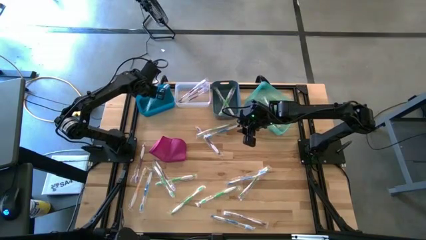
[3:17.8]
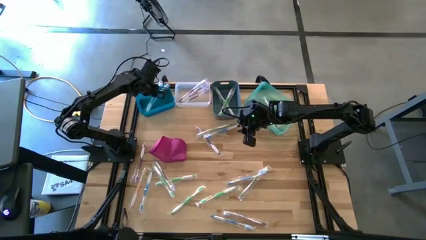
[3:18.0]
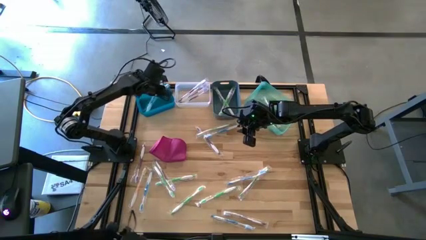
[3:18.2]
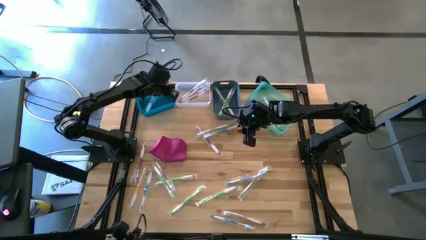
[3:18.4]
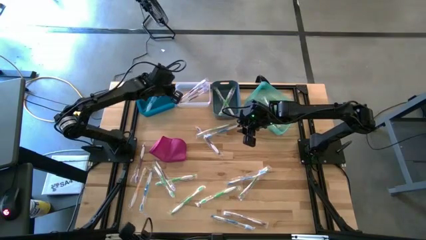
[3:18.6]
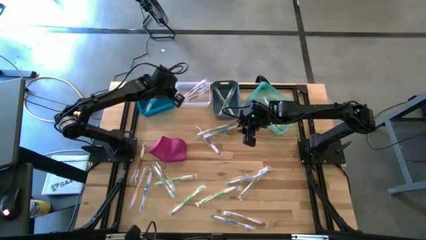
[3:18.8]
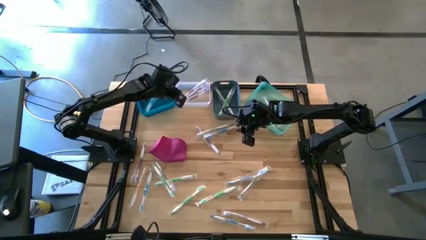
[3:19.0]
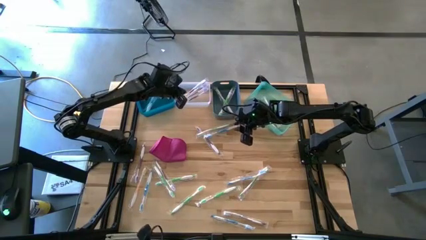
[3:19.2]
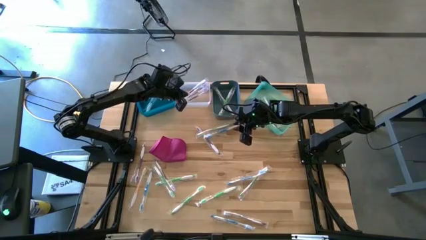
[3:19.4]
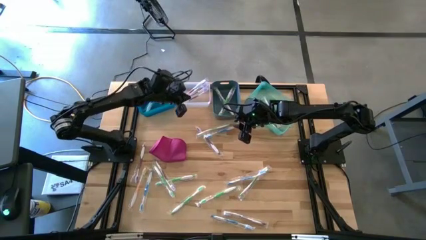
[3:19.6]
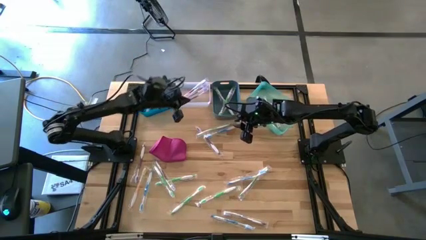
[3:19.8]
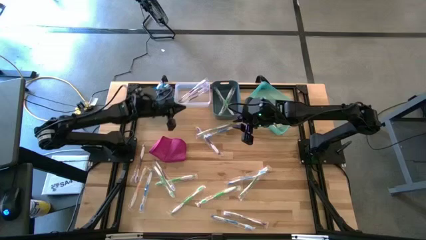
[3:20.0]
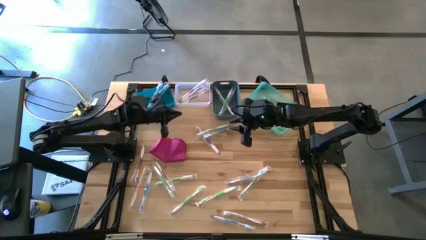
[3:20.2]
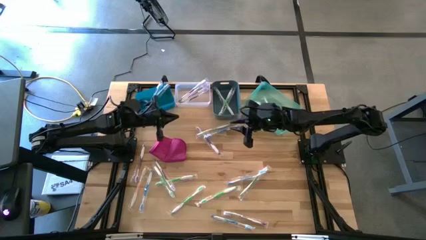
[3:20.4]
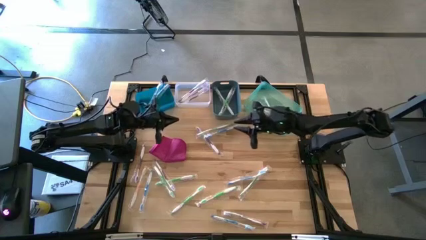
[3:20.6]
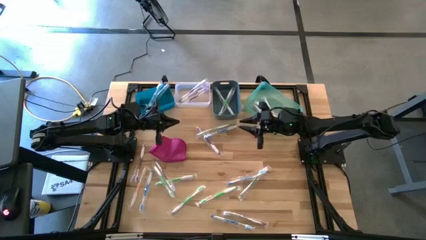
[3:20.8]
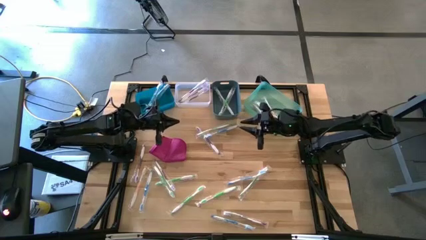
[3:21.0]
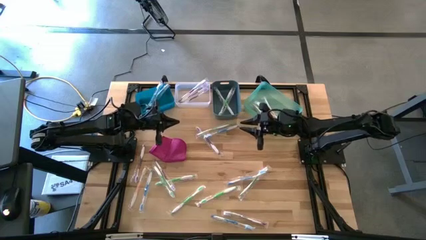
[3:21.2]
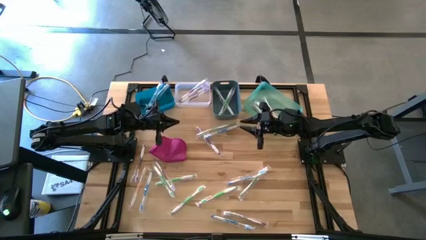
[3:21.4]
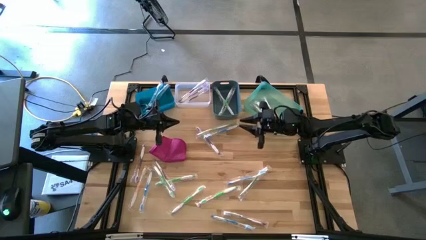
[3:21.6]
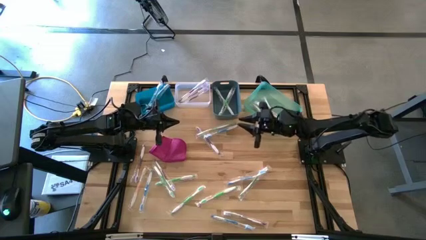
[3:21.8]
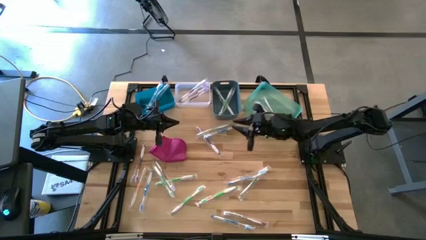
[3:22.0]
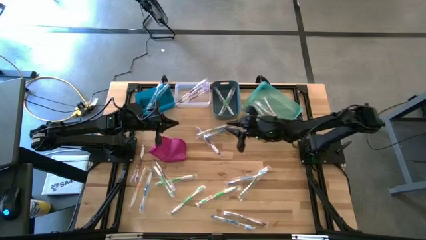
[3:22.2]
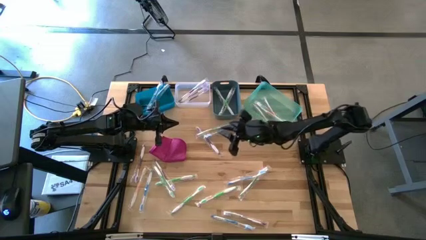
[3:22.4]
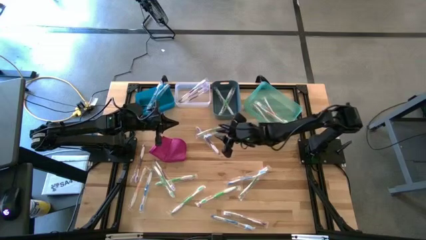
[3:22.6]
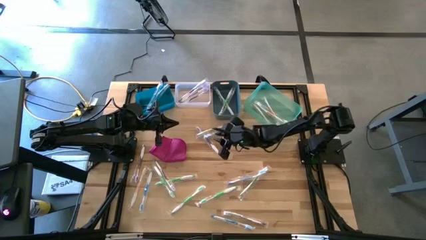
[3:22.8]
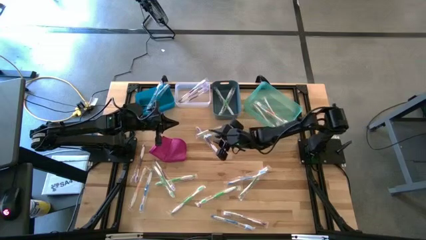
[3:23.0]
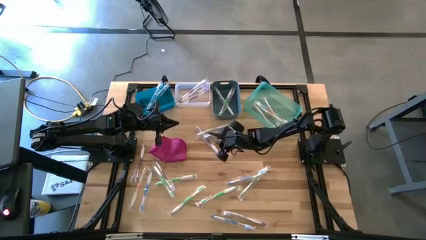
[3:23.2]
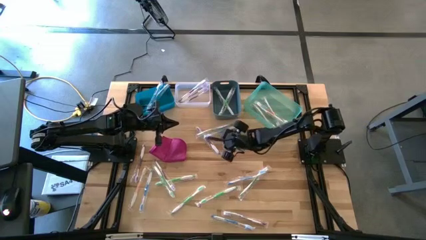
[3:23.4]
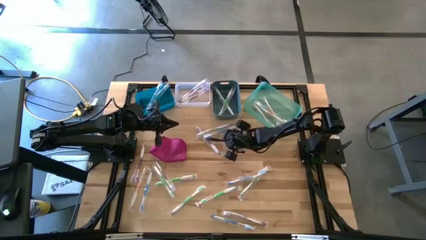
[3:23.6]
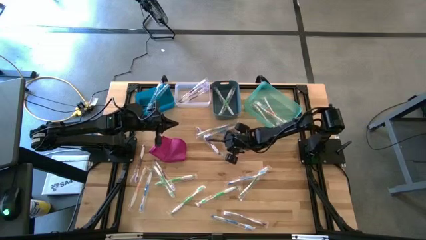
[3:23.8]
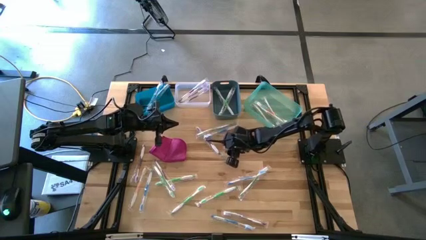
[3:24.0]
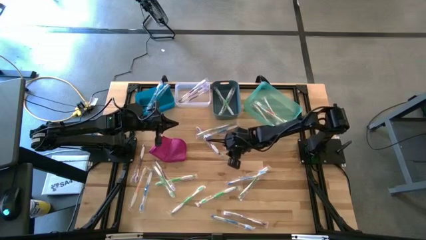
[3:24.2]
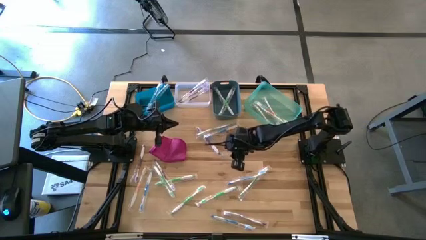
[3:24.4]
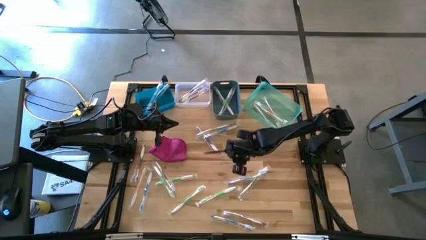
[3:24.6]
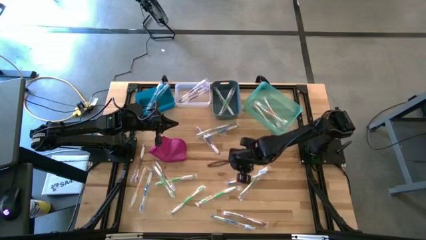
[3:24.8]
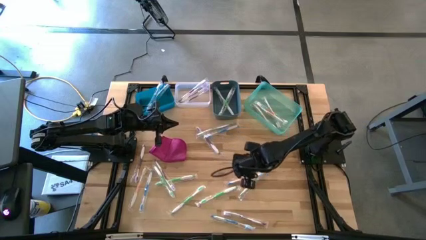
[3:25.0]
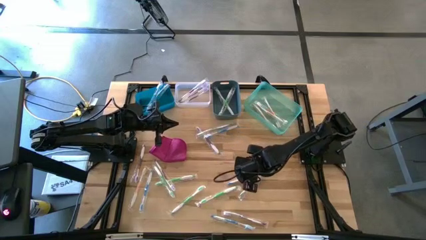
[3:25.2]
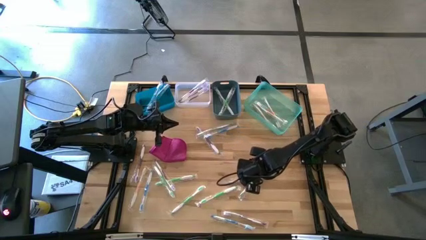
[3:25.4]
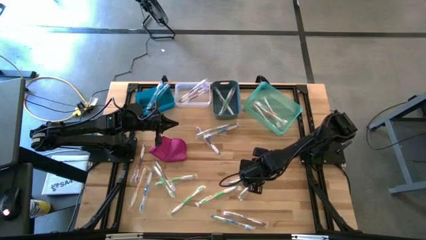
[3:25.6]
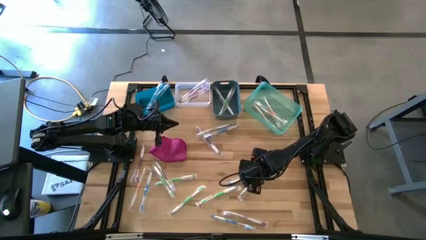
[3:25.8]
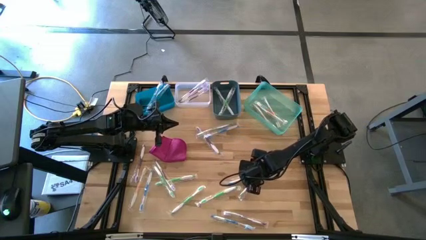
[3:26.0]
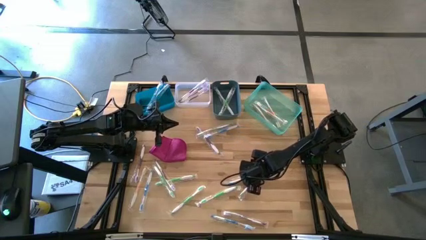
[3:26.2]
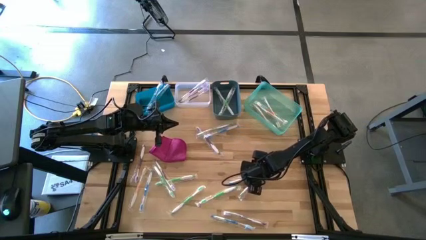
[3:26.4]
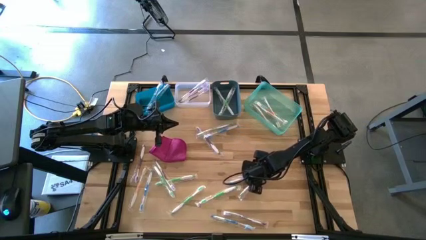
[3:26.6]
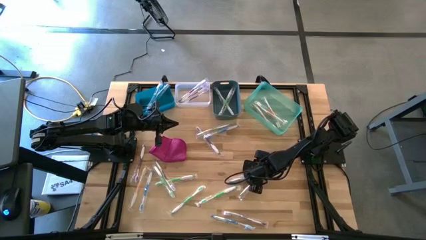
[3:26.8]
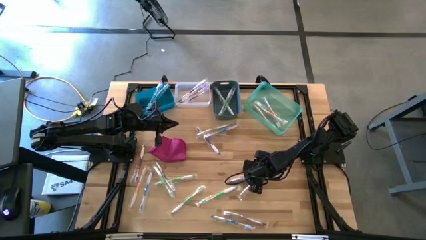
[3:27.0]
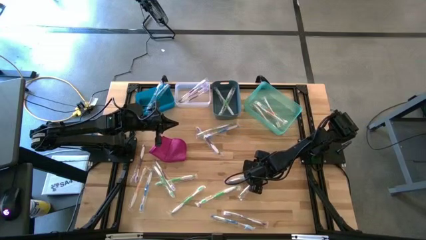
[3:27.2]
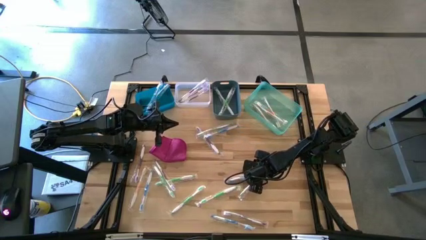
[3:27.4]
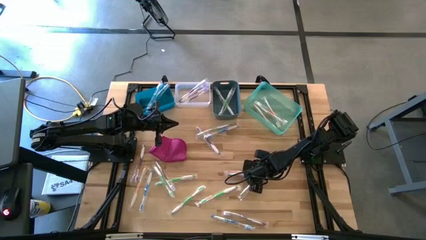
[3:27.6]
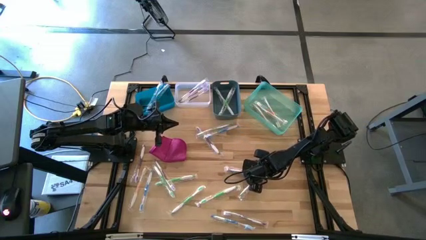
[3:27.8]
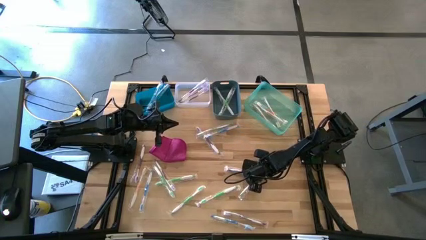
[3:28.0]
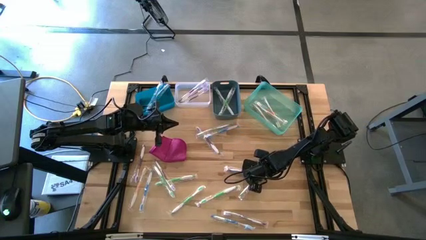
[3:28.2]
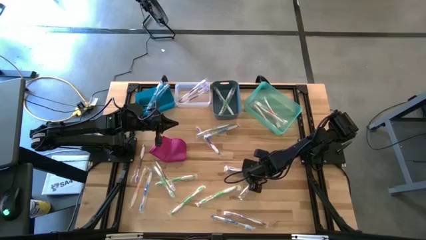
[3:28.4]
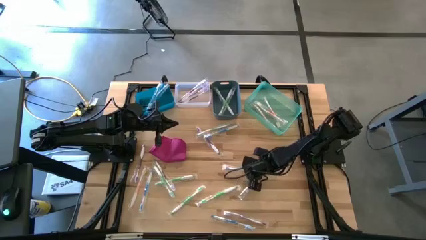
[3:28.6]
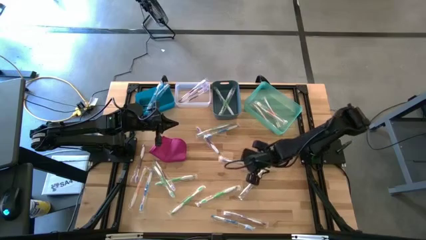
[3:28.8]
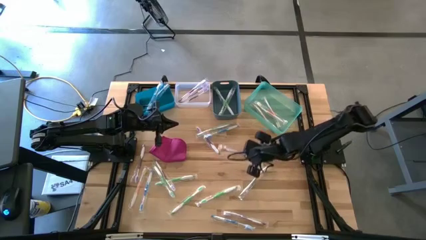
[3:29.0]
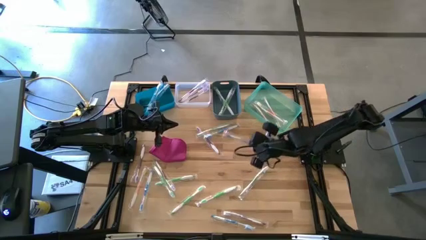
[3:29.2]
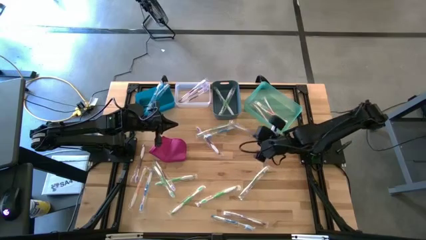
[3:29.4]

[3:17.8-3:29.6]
Task: Pick & Place Toothbrushes
Put the blue toothbrush into the blue bin

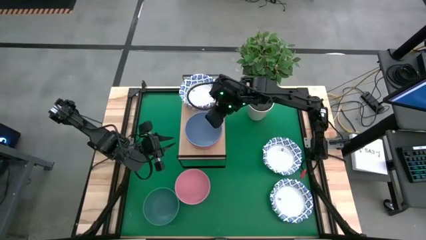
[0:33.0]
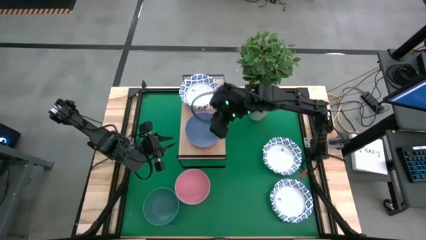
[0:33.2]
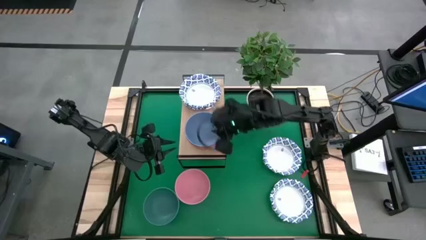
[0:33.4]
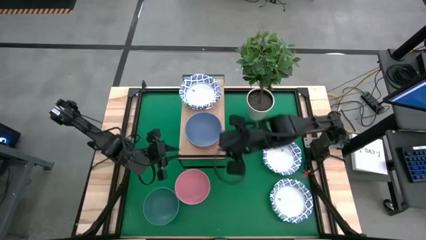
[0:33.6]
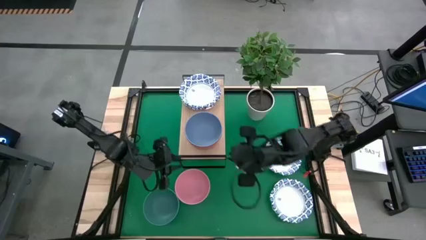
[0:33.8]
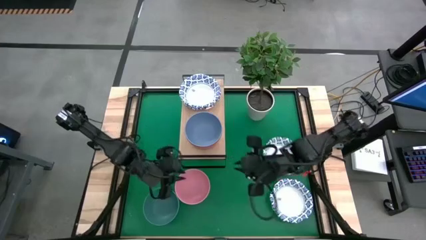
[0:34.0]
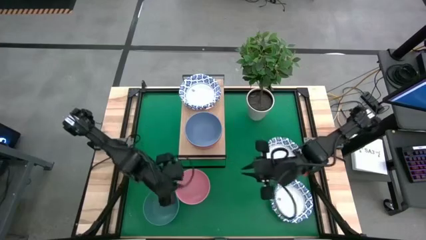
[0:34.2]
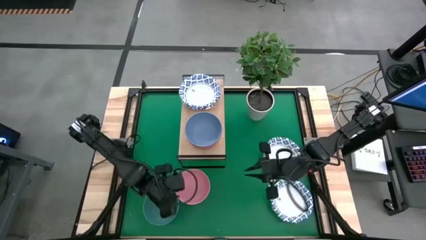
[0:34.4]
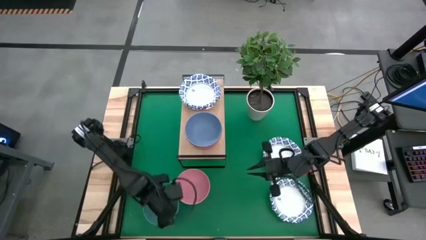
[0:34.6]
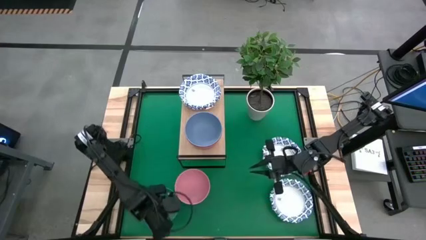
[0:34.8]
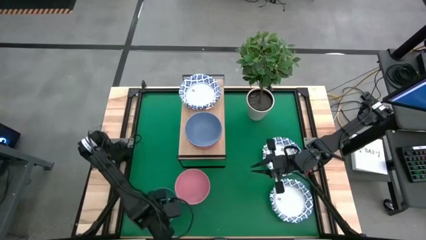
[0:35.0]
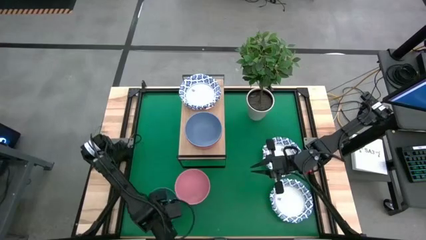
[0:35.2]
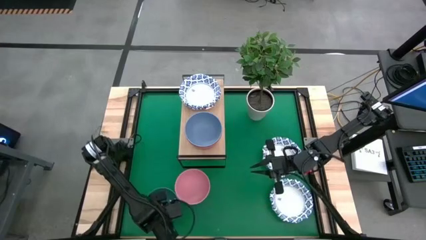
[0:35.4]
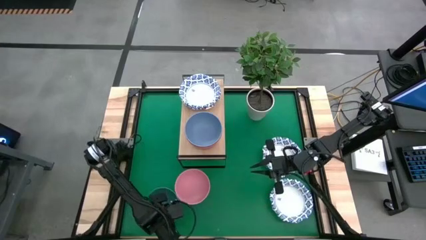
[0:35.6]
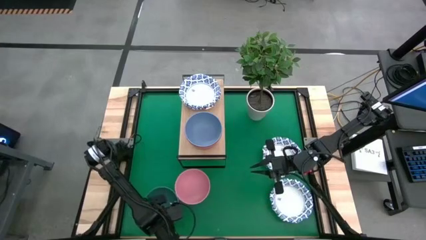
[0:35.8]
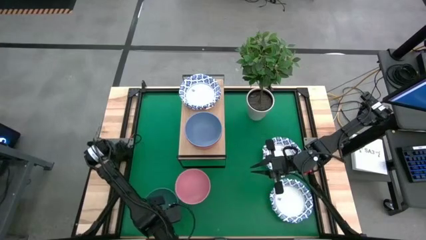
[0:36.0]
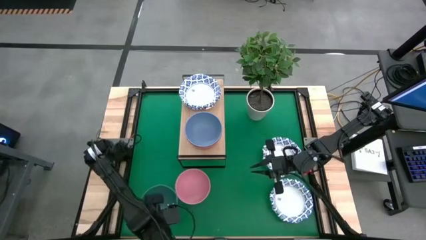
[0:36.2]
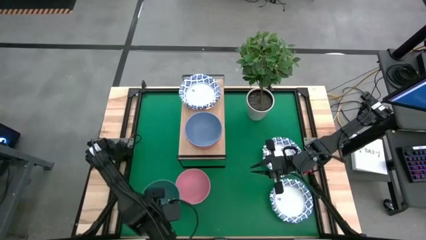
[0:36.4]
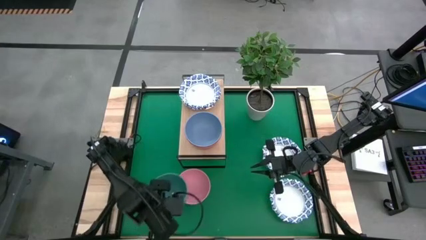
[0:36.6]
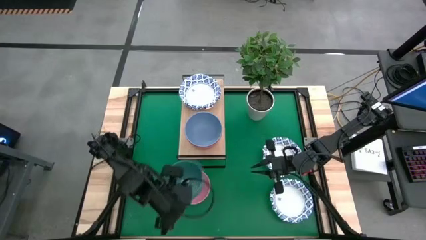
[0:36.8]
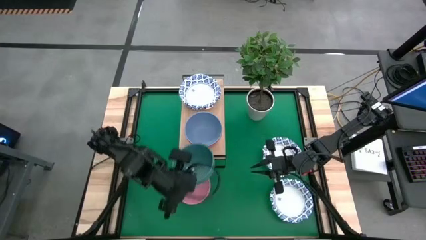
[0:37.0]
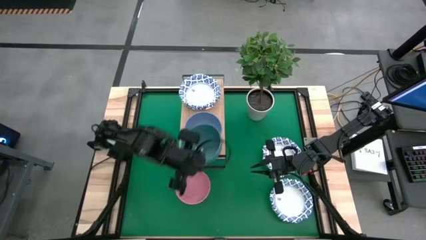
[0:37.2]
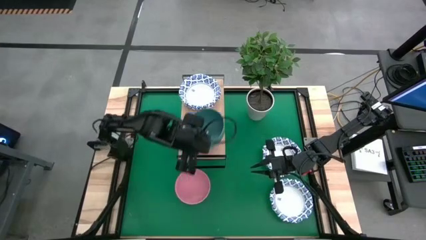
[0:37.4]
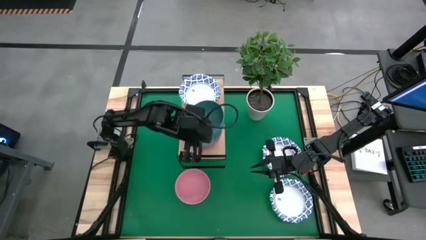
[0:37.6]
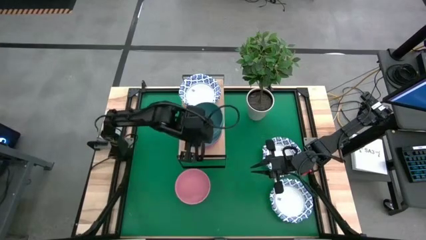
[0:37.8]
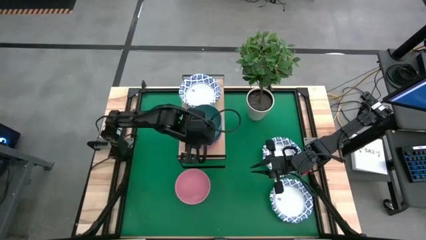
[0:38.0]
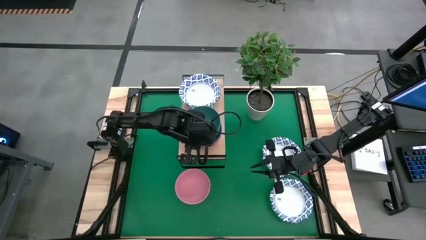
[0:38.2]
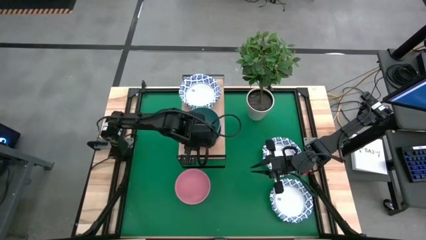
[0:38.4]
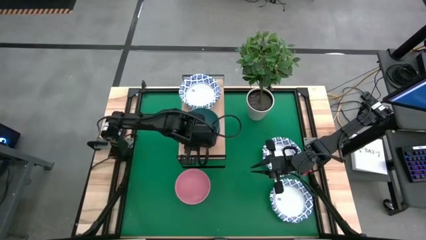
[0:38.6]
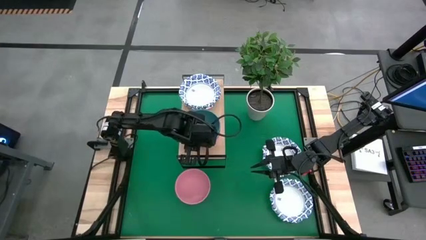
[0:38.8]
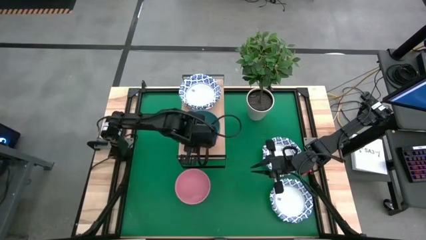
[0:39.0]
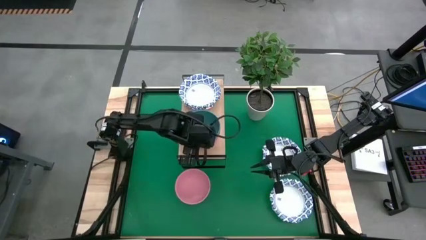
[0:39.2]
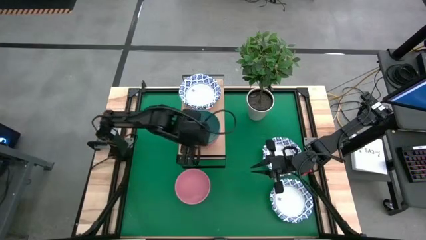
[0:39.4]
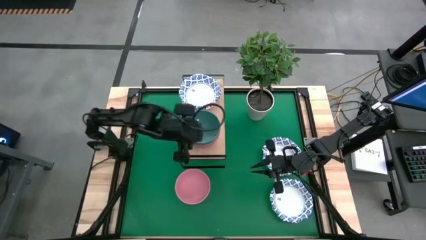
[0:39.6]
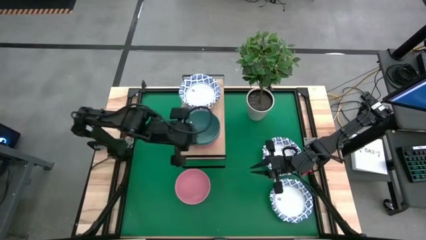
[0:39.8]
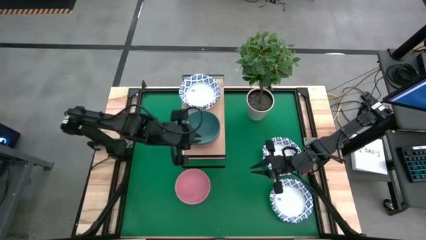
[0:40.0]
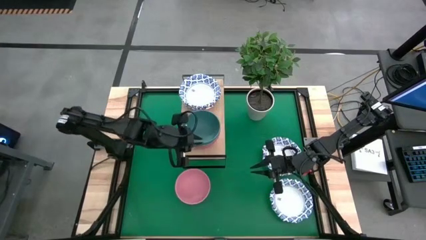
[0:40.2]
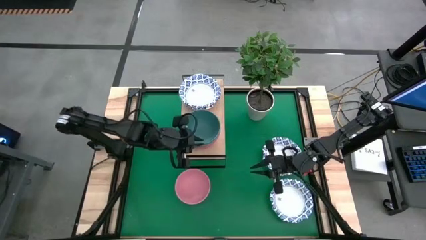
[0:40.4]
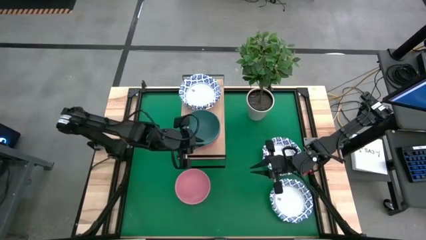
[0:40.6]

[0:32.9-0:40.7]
Task: Place and stack bowls onto a shelf
Stack the green bowl on top of the blue bowl on the shelf
